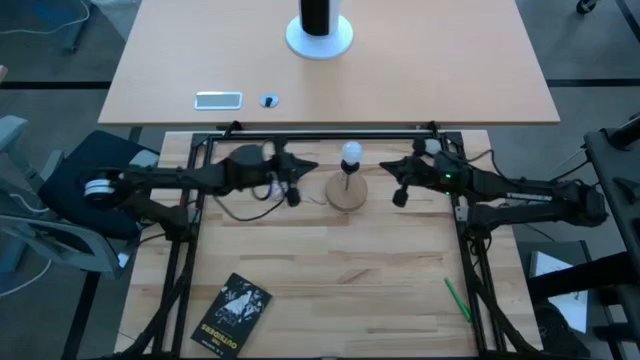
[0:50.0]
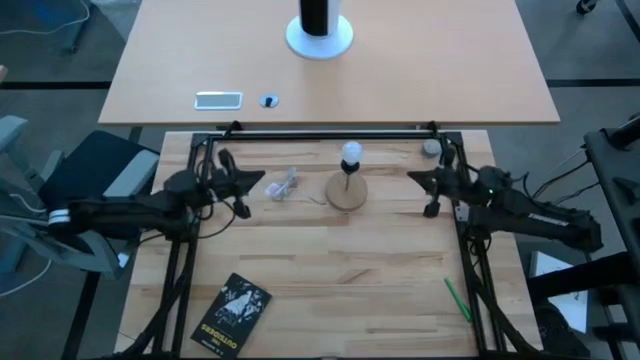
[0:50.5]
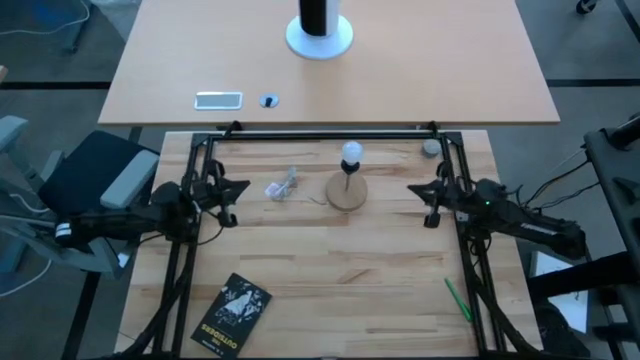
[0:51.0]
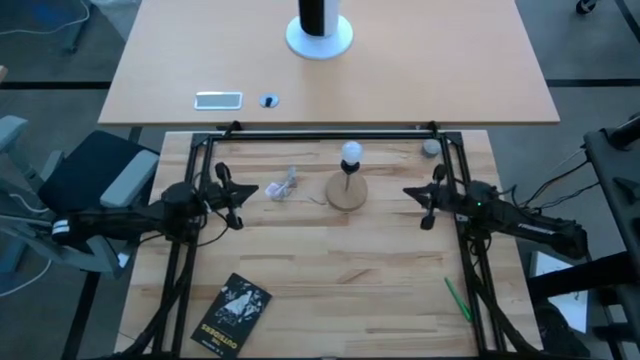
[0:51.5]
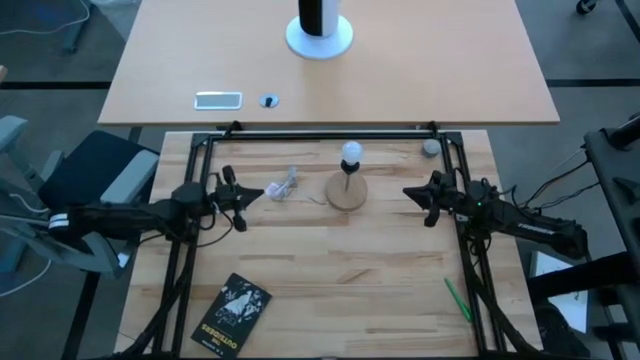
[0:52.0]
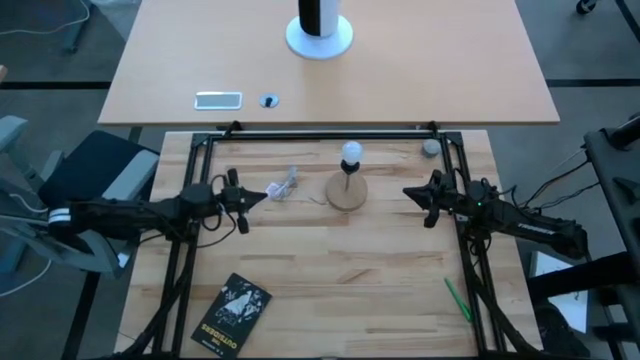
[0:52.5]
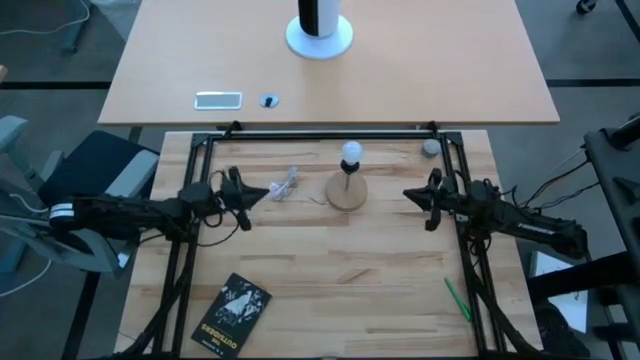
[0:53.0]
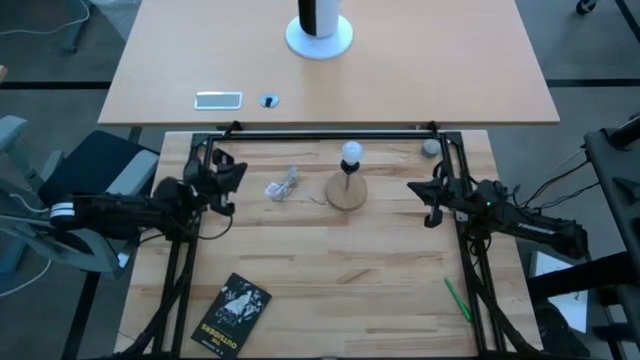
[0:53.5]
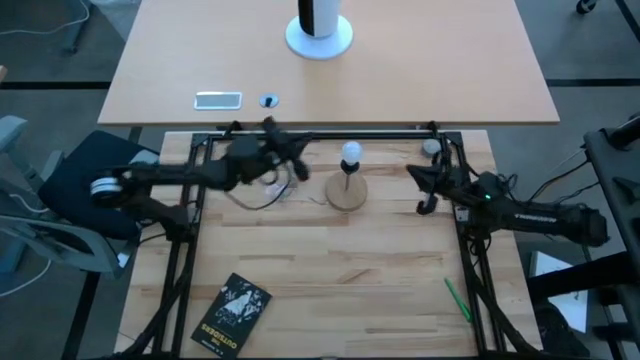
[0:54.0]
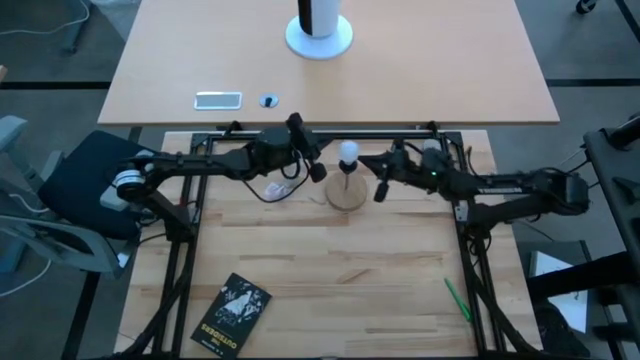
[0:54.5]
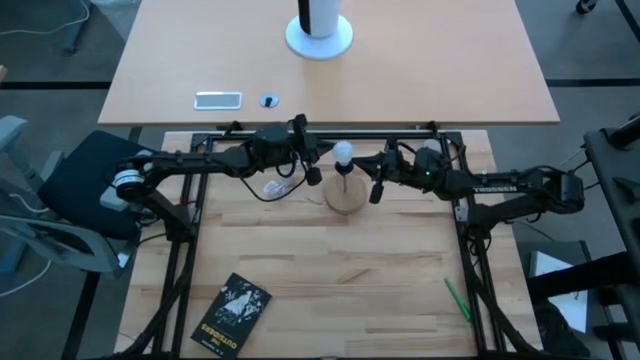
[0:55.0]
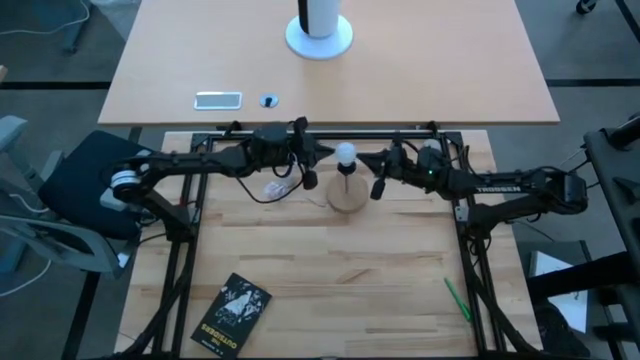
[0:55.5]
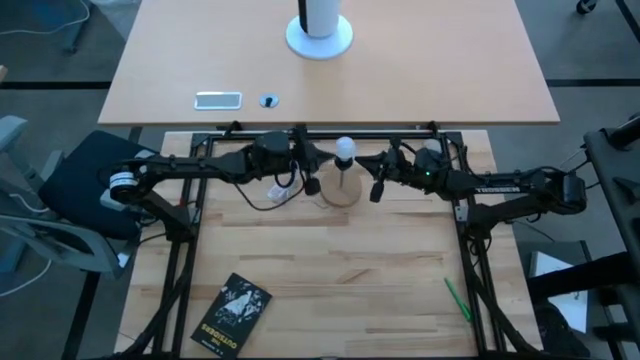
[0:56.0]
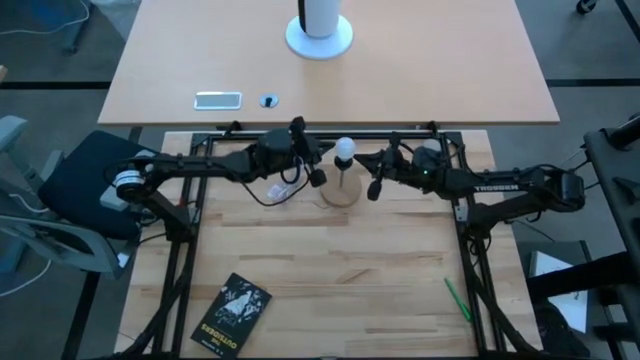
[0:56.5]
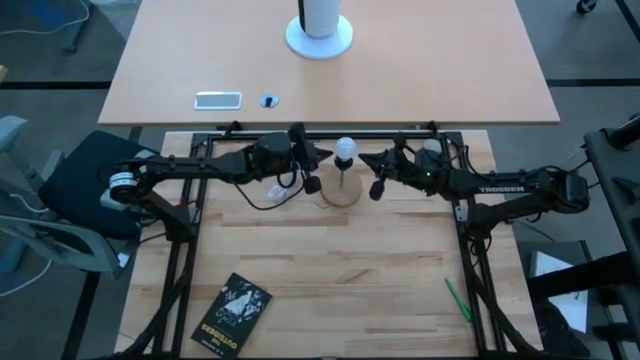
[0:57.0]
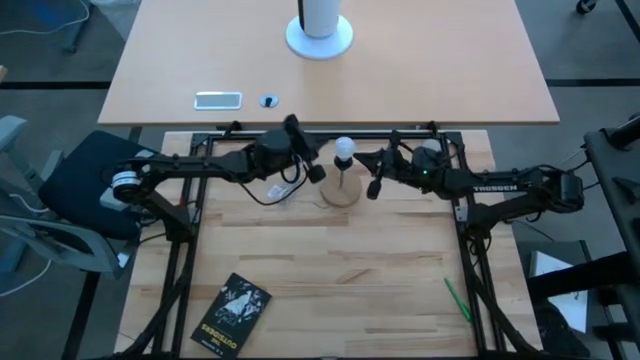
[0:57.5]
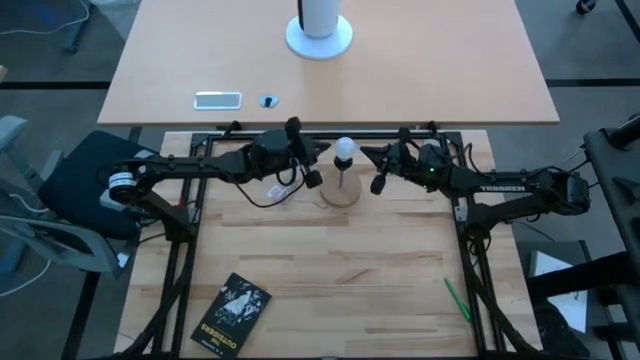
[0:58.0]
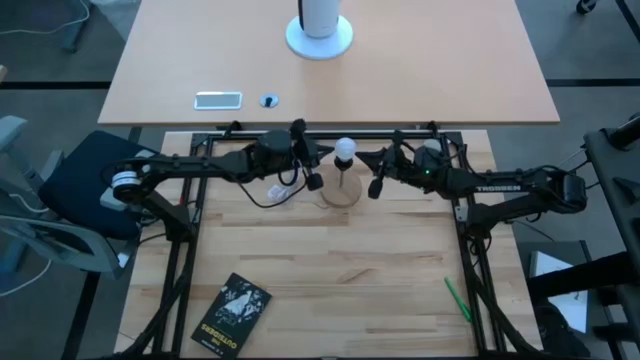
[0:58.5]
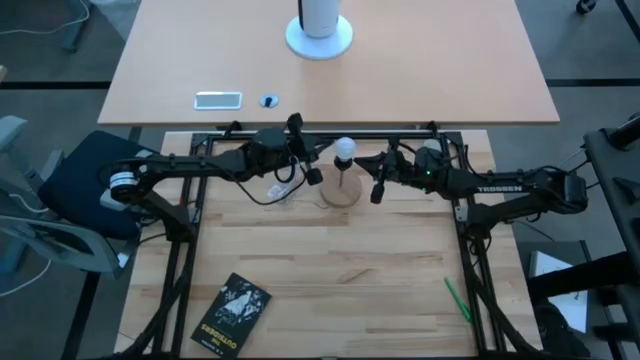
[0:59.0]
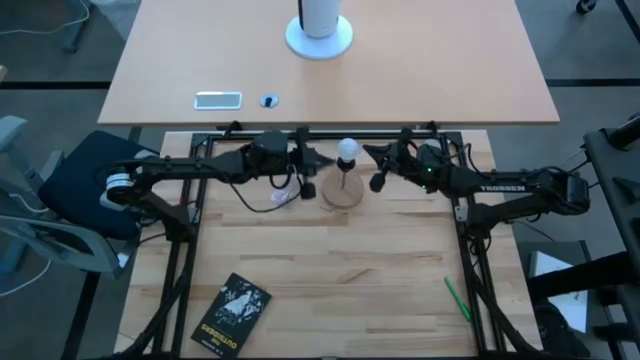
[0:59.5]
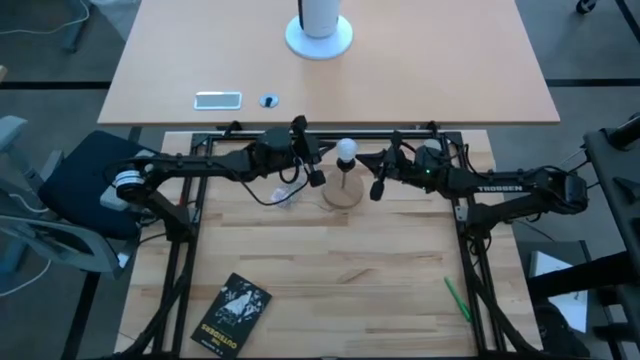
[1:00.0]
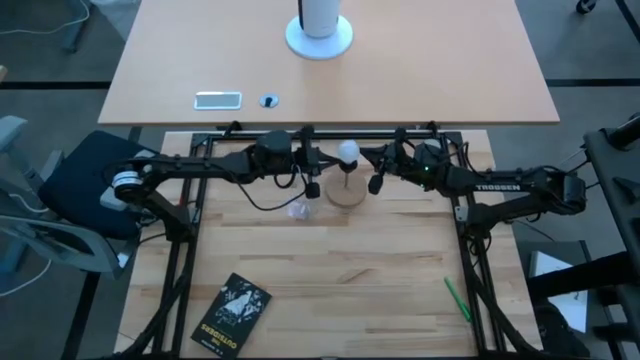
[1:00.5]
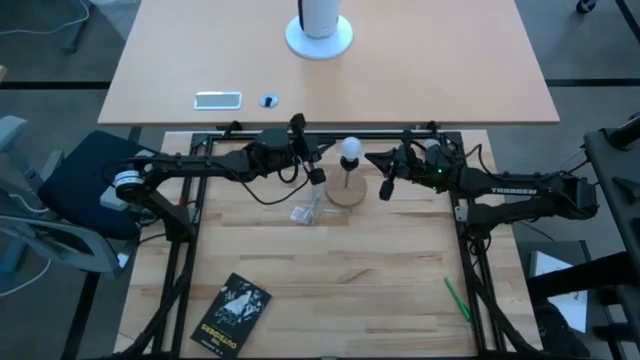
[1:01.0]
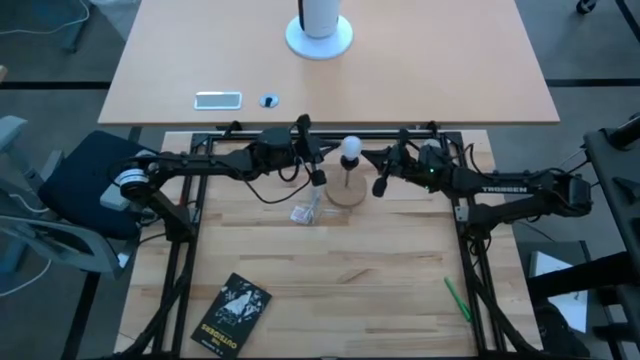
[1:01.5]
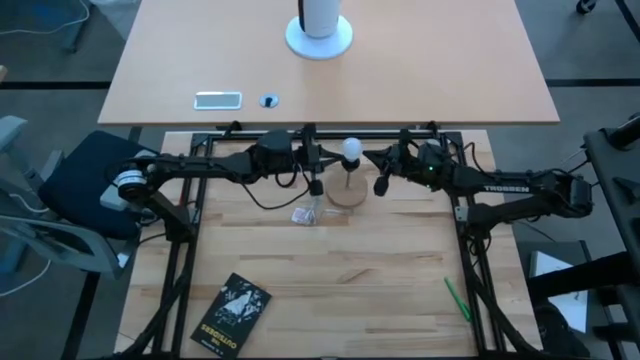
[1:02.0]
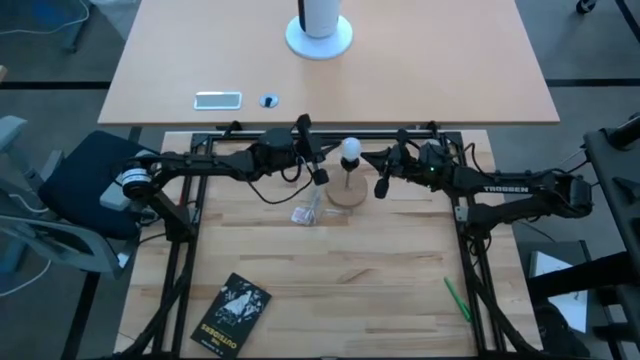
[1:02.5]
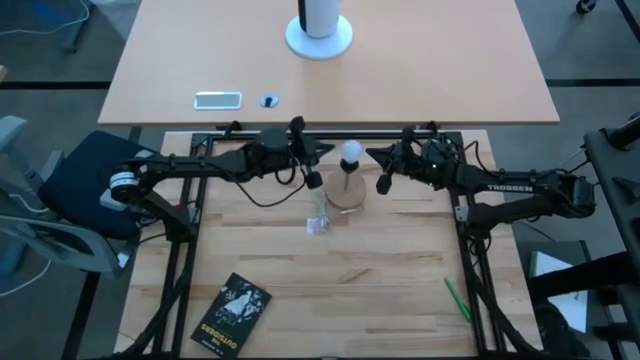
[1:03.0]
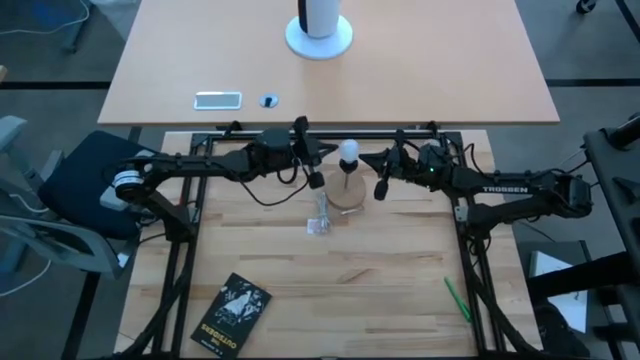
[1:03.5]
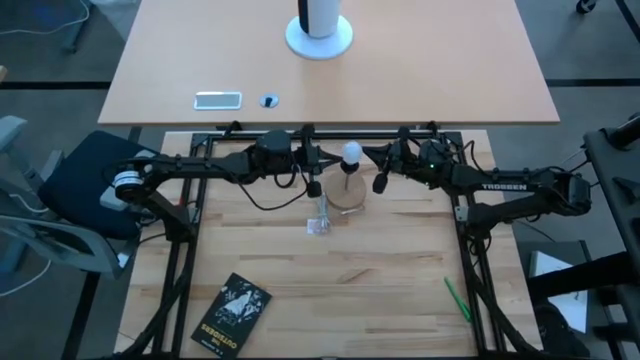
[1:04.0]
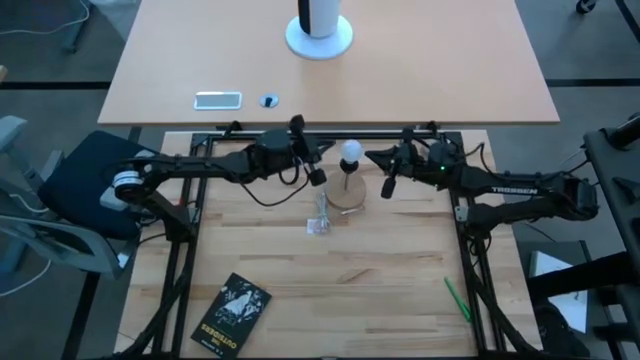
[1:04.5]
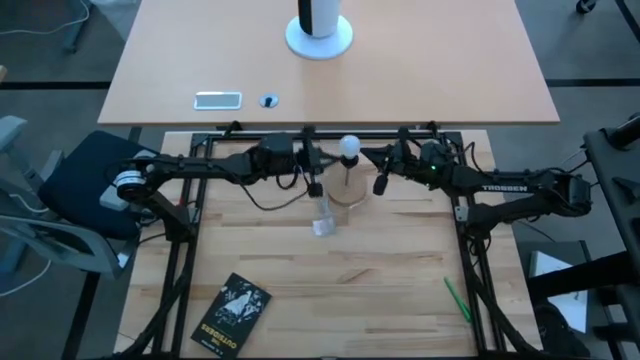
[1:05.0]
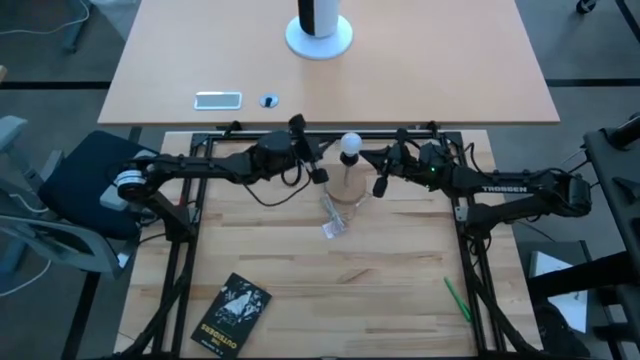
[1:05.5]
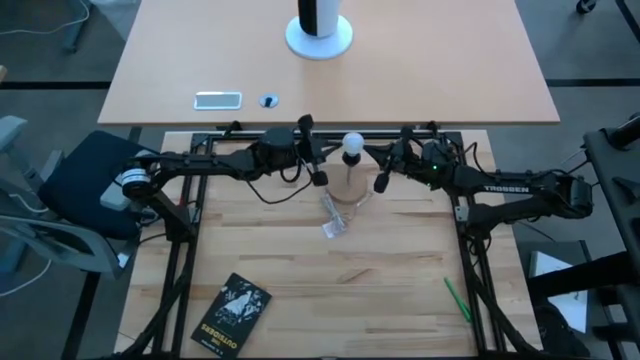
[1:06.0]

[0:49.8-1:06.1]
Task: Screw lightbulb
Remove the lightbulb from the lamp

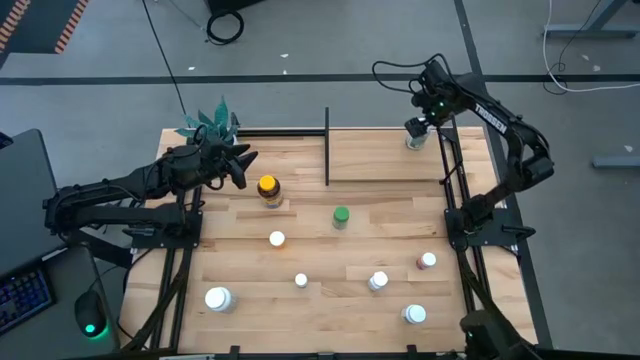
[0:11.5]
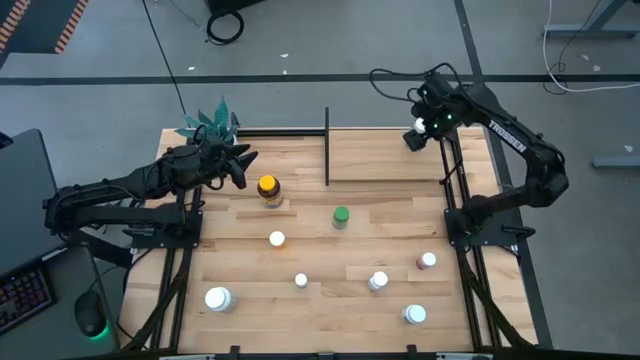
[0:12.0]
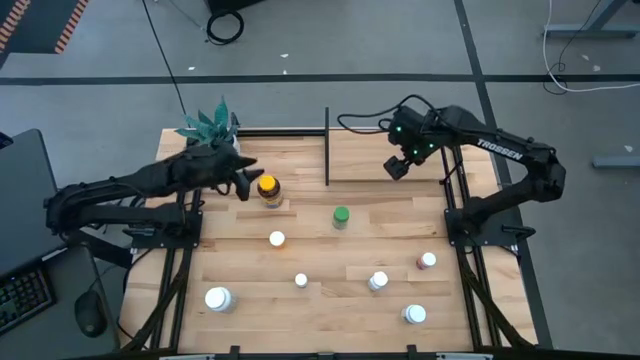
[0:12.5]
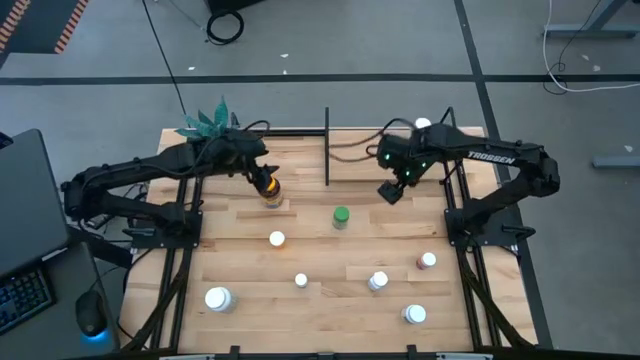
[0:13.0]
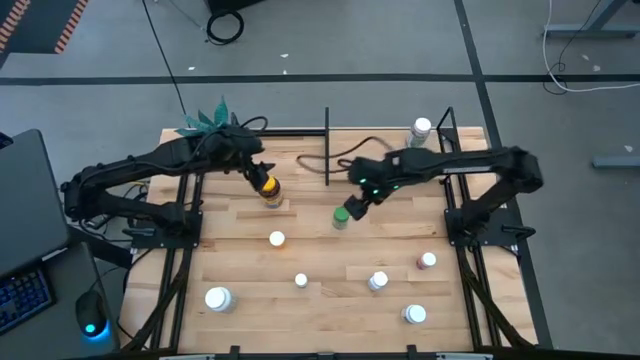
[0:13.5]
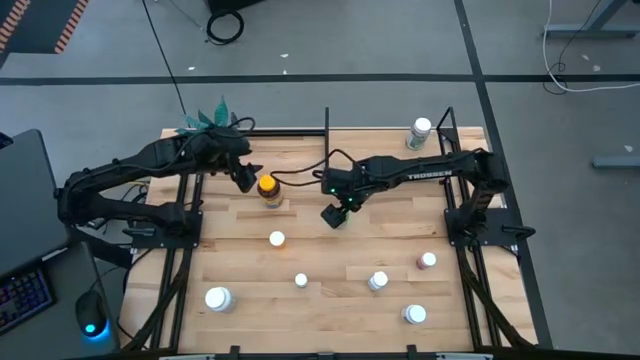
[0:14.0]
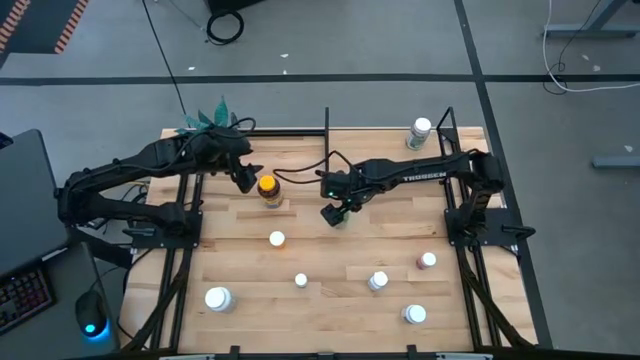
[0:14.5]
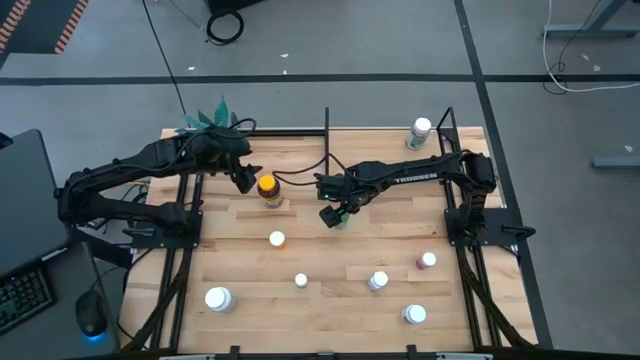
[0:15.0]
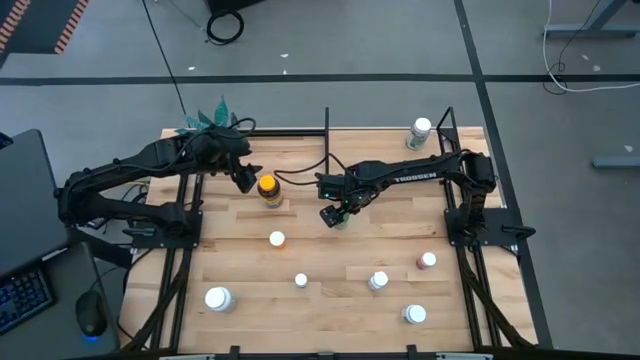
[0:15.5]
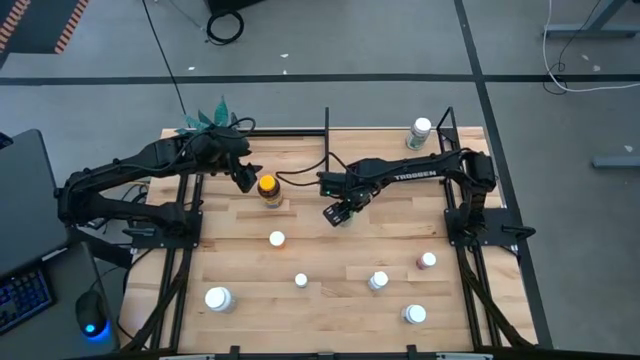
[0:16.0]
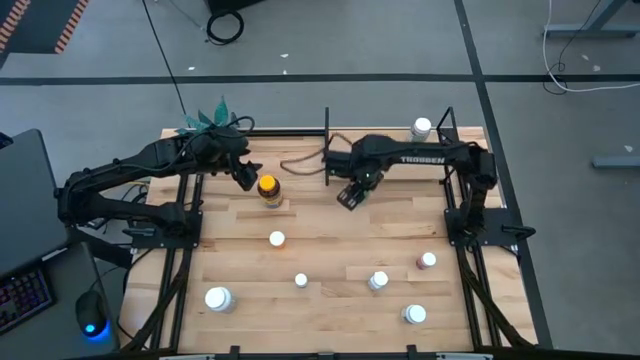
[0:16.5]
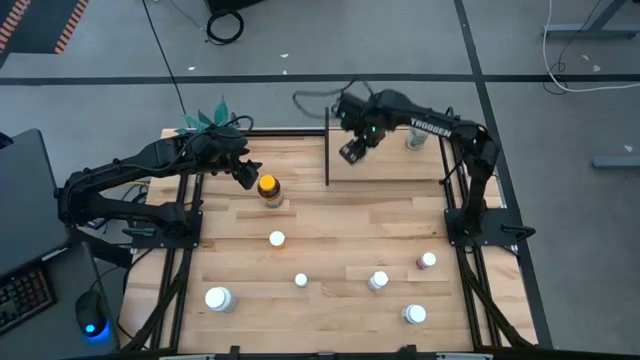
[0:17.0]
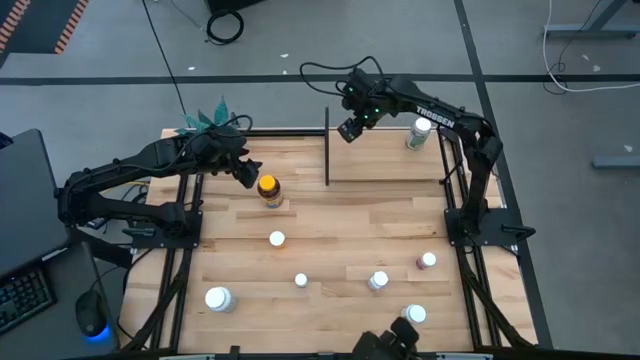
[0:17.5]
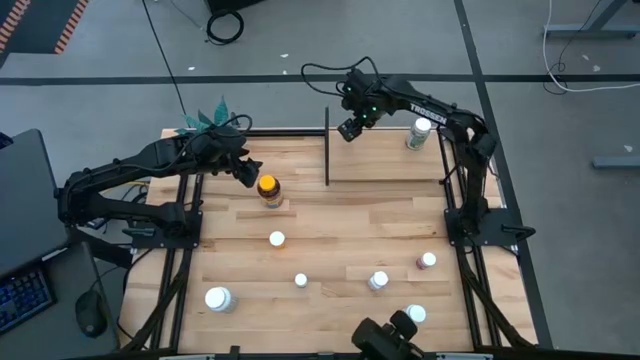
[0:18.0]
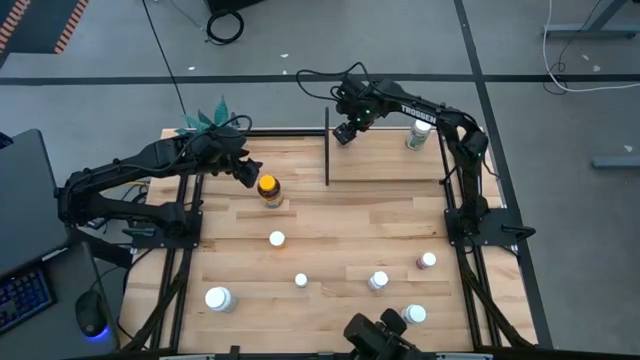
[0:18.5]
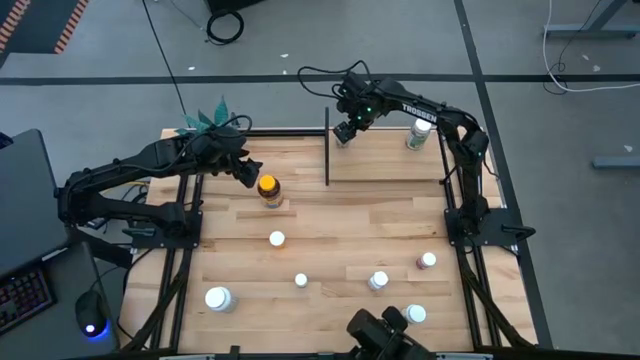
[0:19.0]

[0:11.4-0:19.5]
Task: Pick and place medicine bottles onto shelf by color
Put the green pill bottle on the shelf
